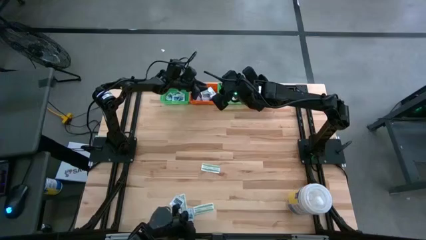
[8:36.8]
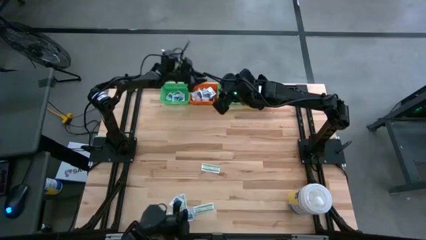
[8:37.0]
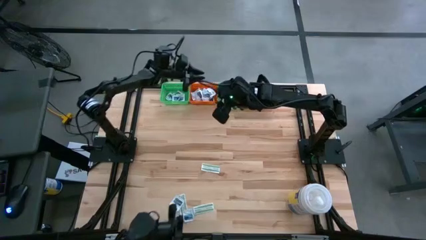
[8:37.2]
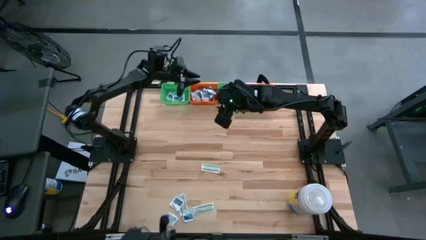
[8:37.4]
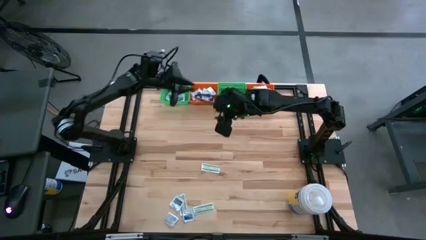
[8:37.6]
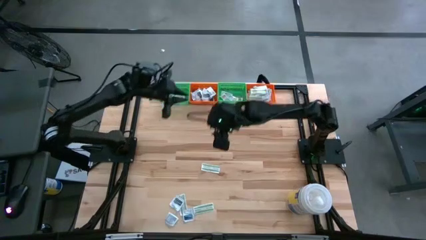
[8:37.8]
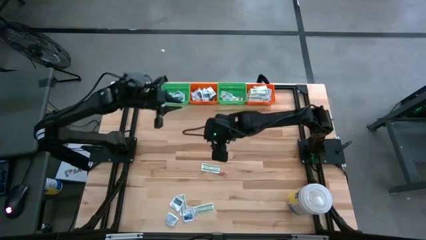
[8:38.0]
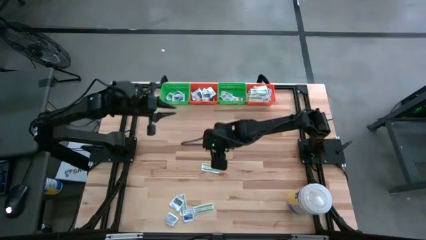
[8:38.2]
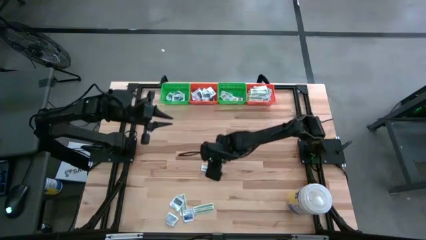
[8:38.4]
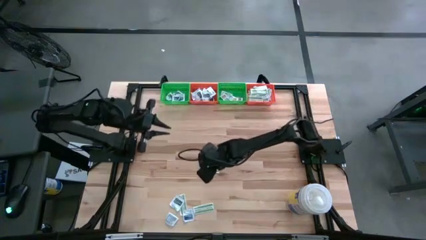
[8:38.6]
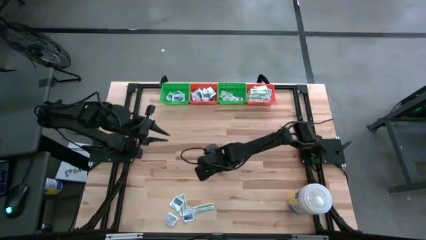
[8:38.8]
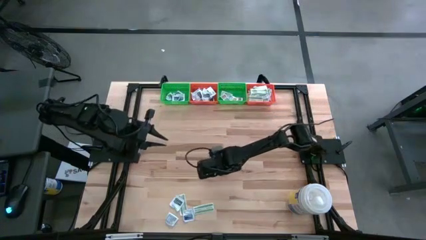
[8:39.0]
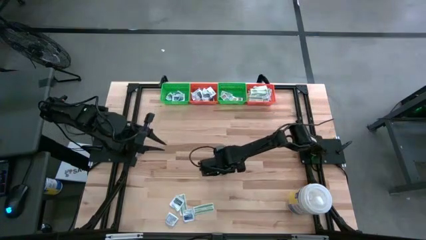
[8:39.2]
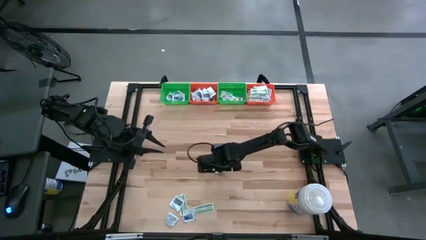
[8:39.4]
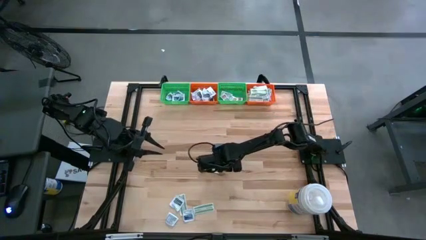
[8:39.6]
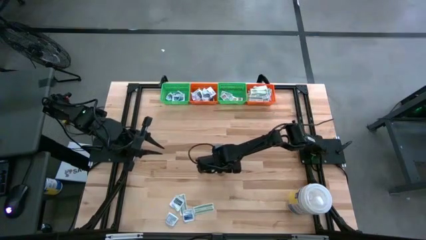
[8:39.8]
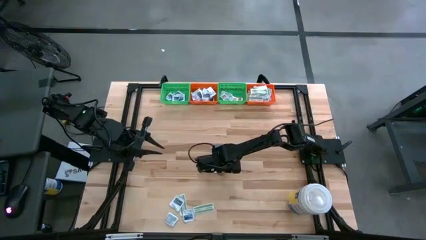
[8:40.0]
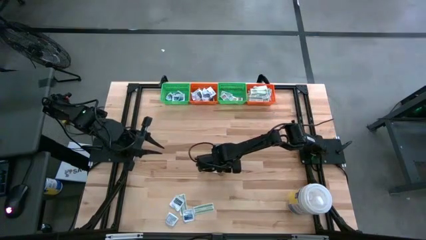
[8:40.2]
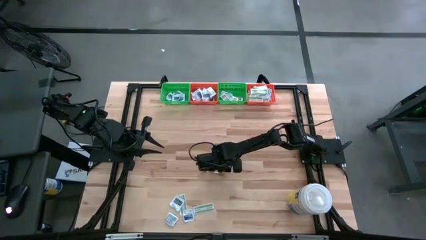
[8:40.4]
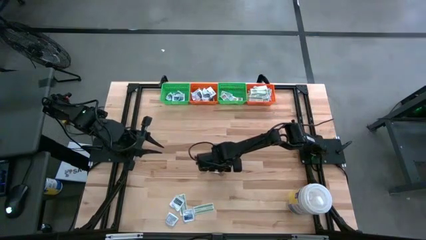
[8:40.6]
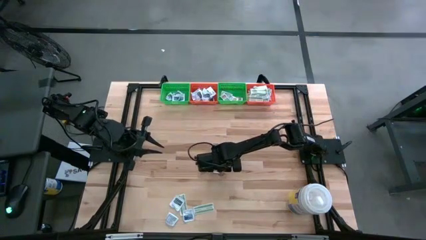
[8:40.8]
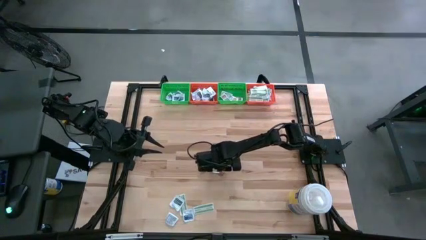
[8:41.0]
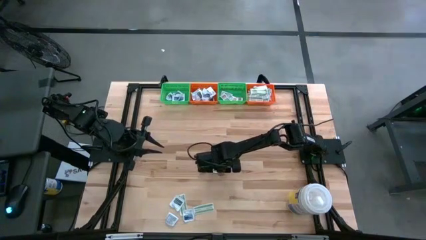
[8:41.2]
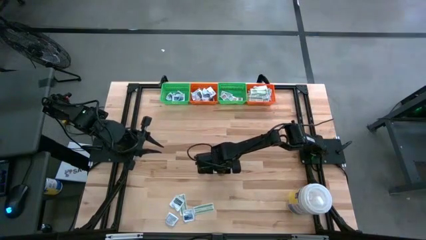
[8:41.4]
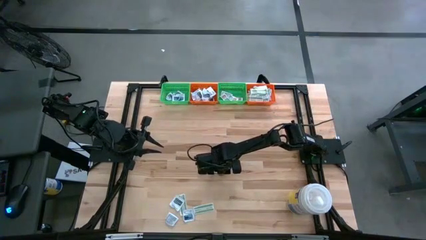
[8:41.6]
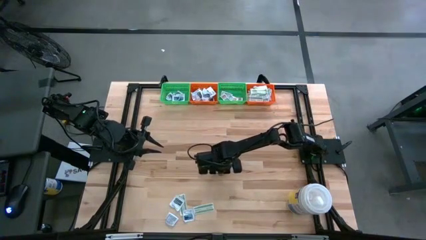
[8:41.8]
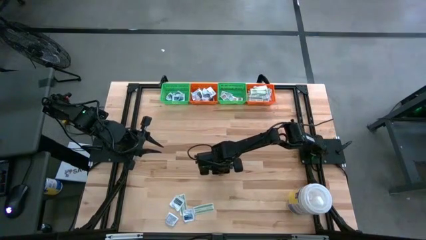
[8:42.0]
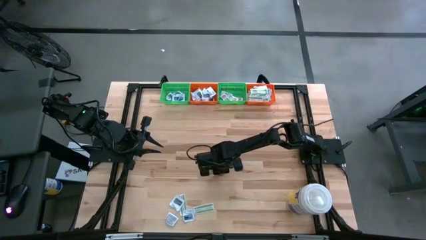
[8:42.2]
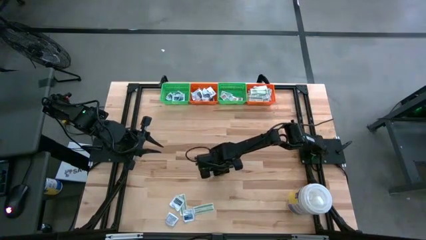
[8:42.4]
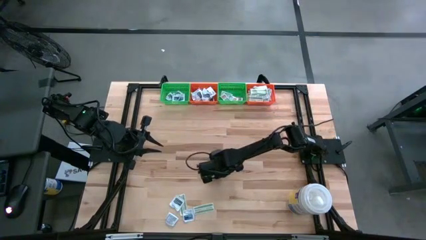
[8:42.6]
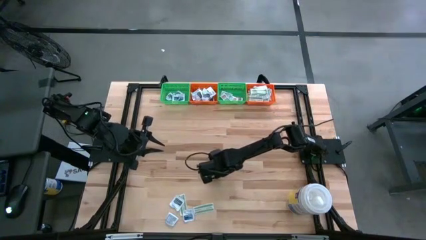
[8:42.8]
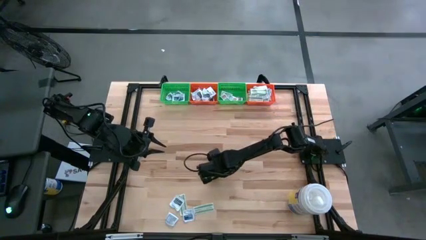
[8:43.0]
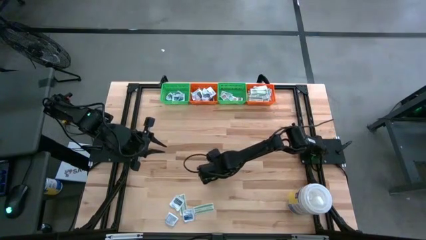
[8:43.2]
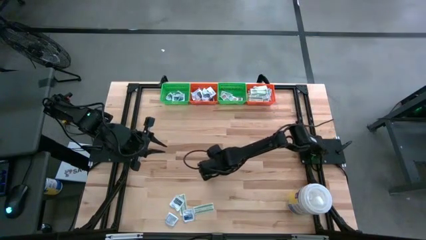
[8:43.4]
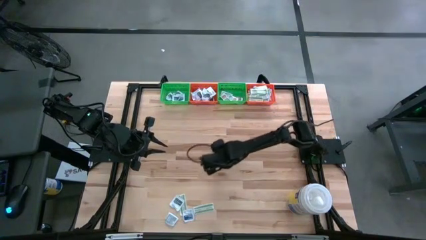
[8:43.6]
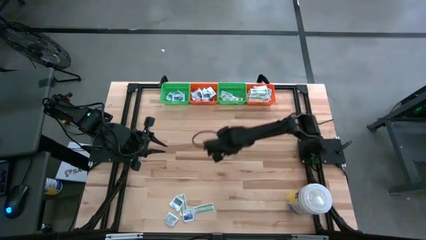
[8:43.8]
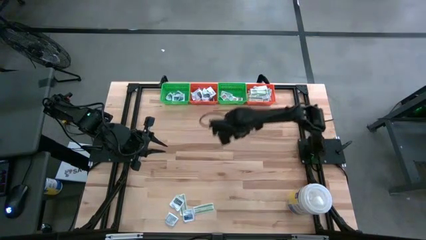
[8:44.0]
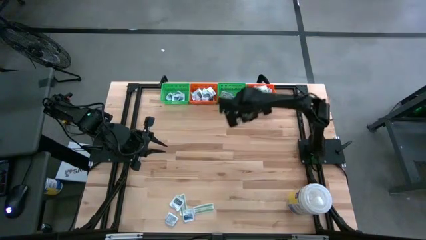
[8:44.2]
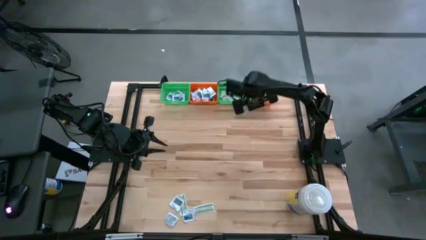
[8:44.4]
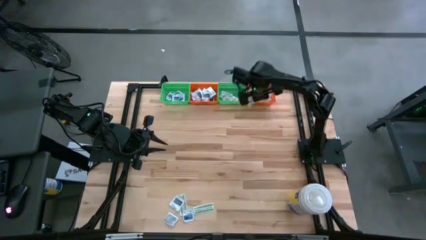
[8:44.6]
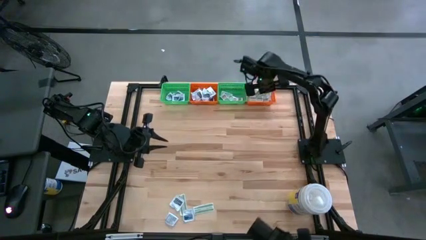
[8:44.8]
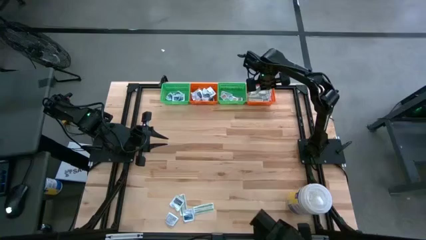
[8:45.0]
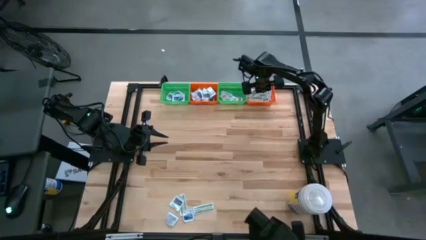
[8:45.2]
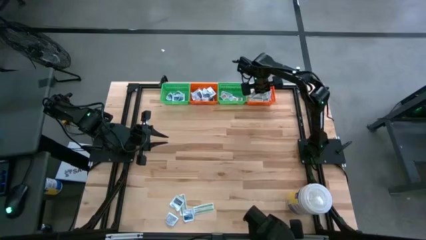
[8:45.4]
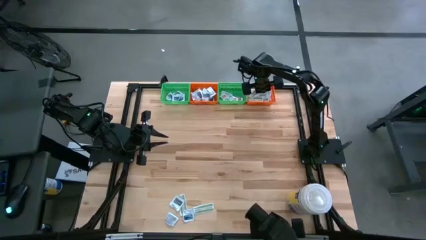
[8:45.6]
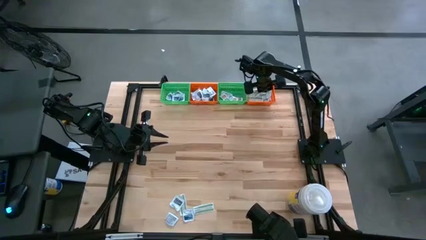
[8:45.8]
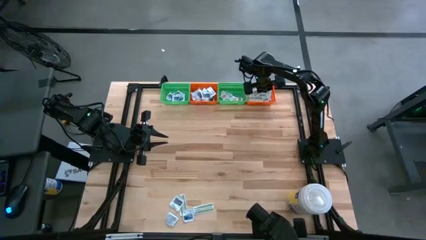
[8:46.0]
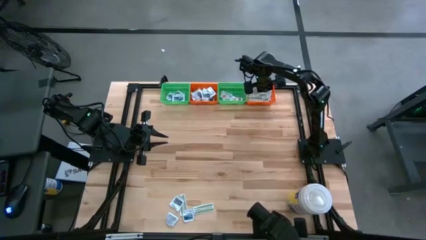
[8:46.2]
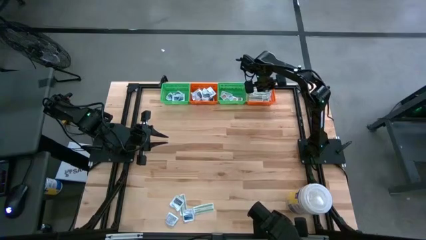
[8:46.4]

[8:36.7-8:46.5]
Task: Pick & Place First Aid Supplies
Put the top green bandage pack in the right orange bin

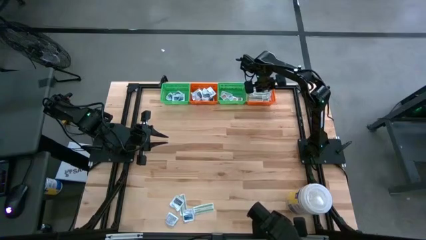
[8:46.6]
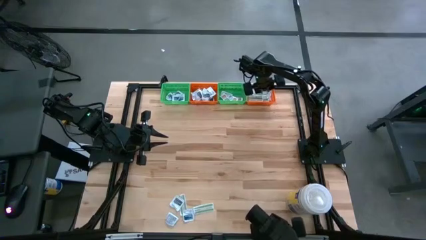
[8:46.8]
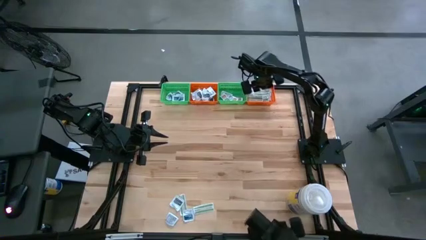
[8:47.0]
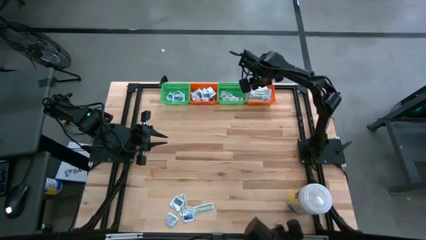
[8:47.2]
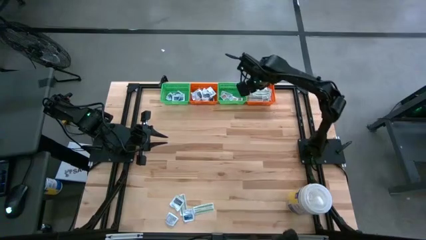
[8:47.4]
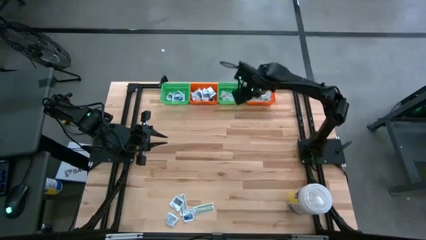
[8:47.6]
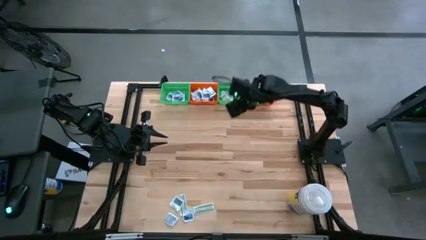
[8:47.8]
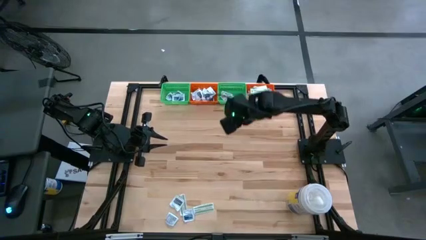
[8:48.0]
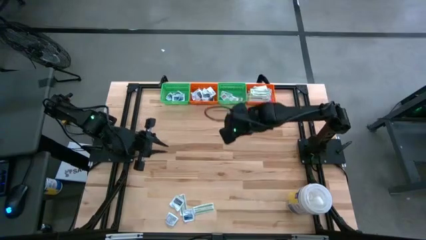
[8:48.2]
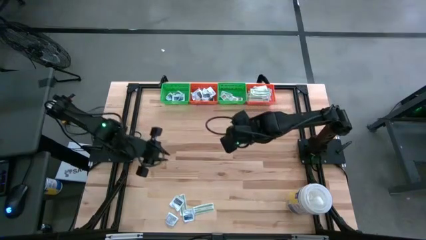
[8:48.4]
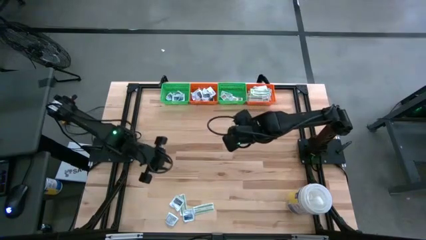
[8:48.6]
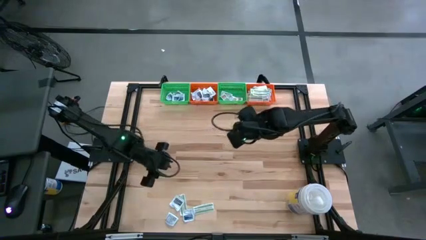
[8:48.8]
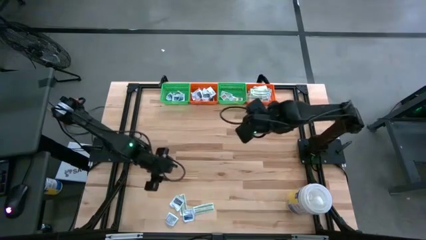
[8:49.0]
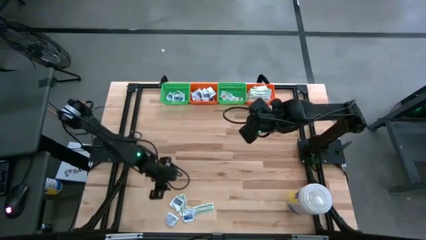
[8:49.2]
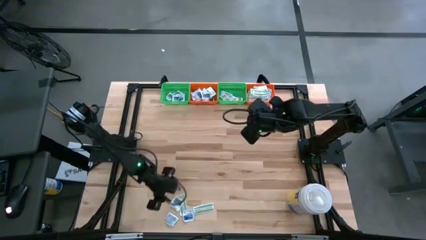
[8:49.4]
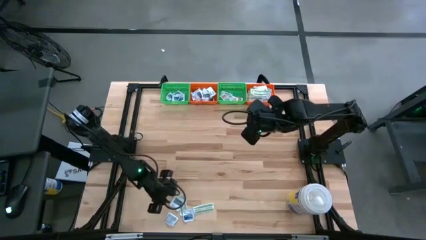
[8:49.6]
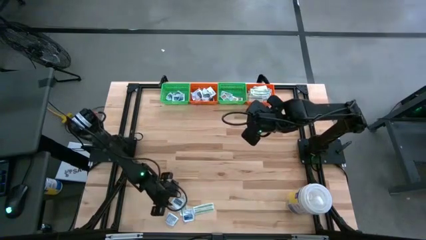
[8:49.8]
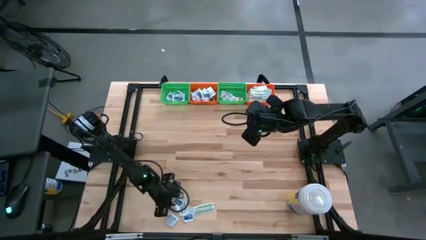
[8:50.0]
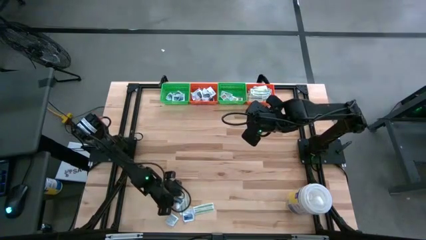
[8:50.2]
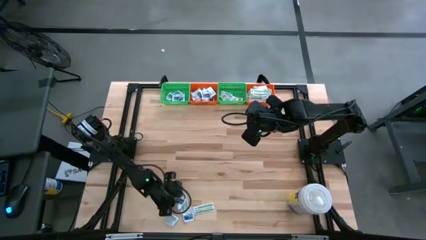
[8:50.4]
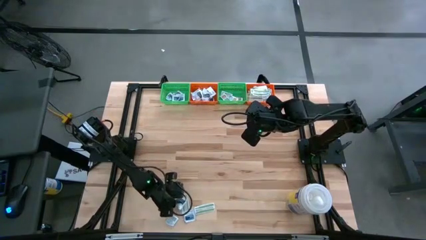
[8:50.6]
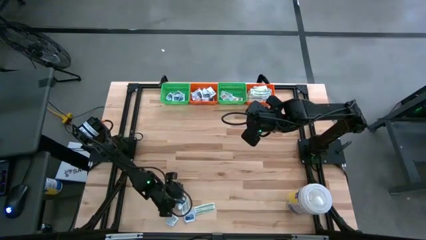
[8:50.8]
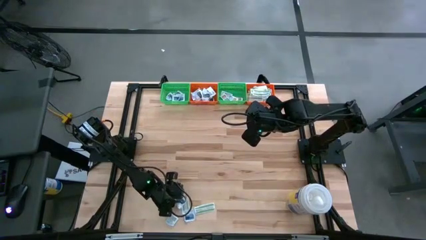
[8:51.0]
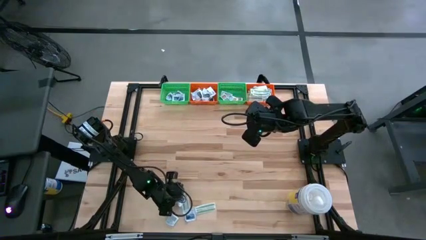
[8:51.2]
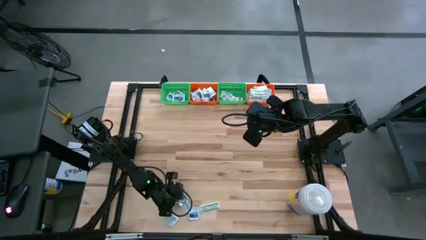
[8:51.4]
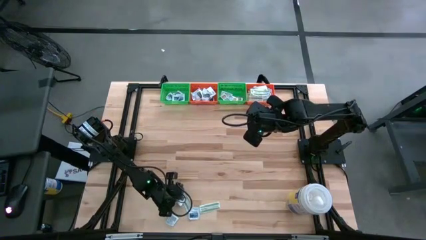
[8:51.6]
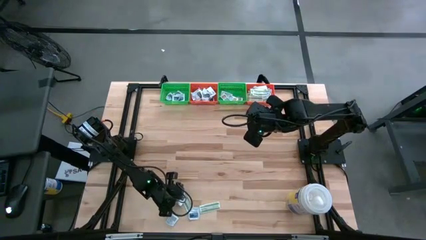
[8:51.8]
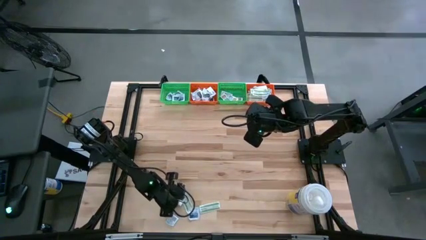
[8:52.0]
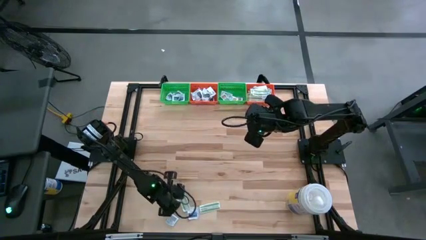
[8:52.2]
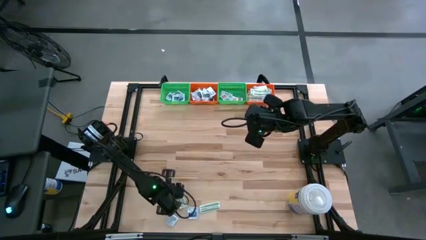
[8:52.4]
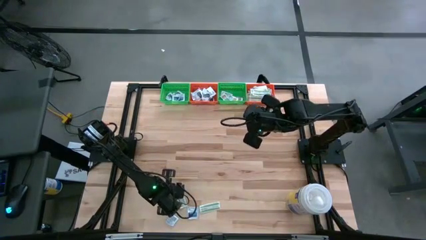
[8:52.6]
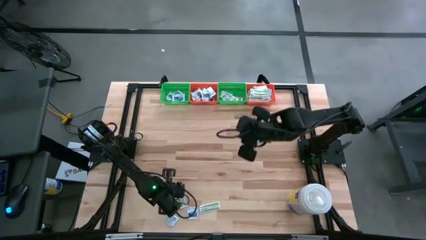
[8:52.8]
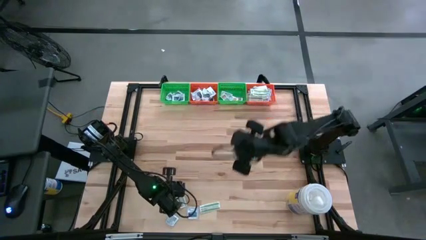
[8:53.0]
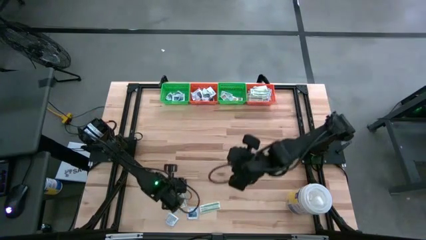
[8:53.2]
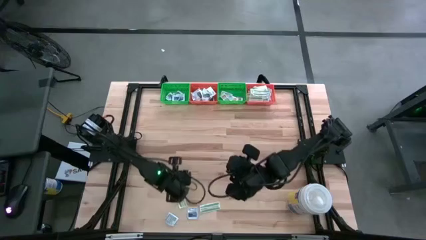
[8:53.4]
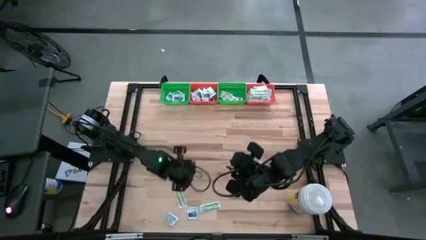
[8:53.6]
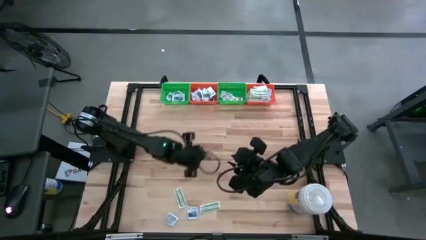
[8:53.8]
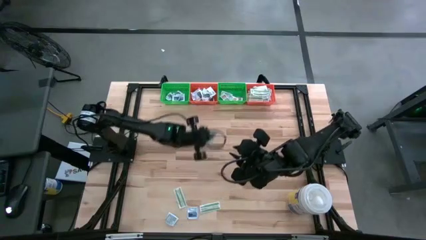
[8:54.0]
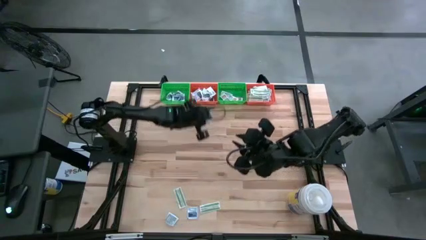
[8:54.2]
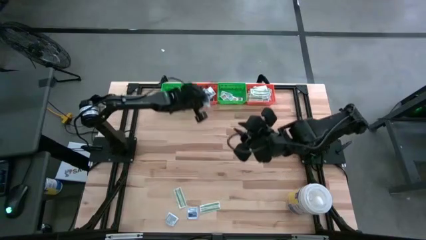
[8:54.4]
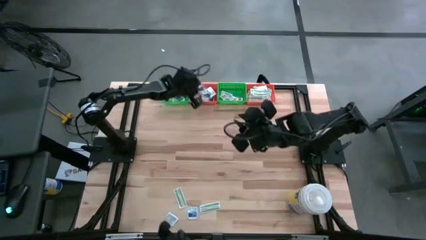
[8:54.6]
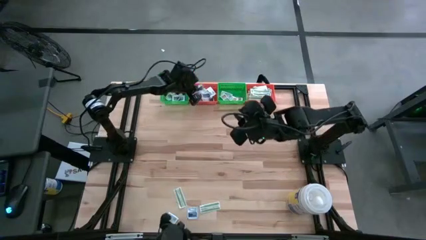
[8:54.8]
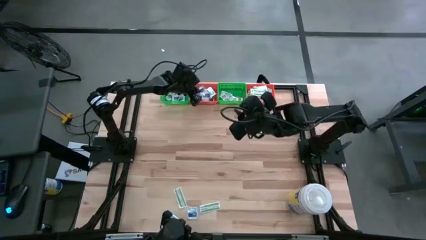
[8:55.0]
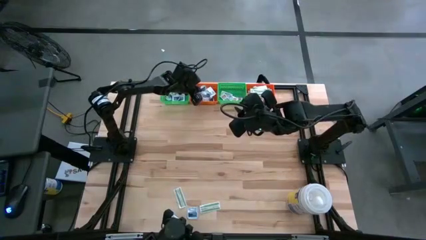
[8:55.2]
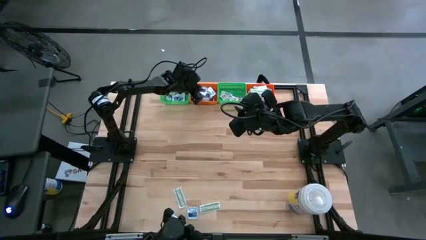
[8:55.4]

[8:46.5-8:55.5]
Put the top gray towelette pack in the left orange bin
